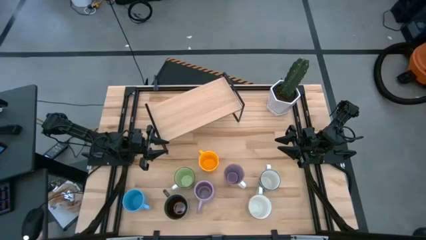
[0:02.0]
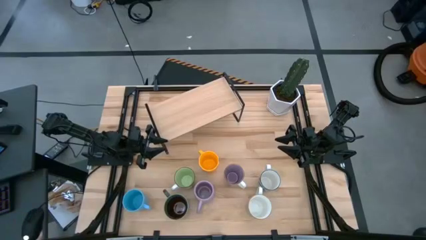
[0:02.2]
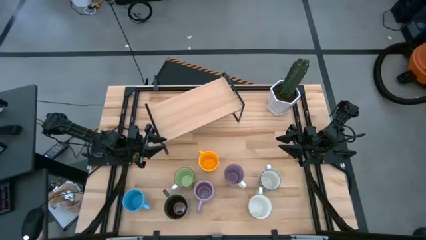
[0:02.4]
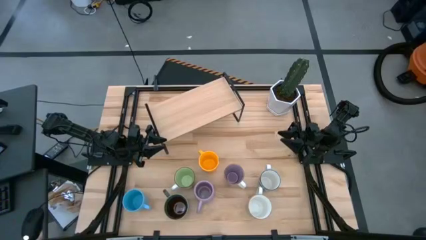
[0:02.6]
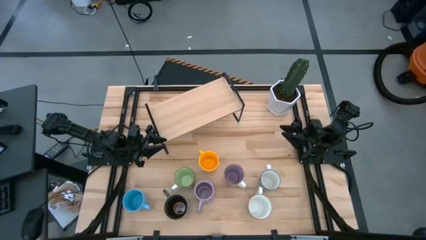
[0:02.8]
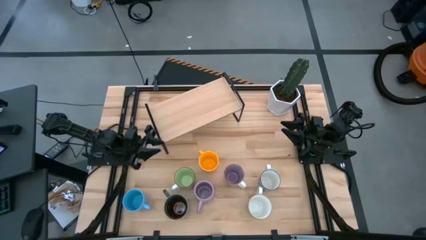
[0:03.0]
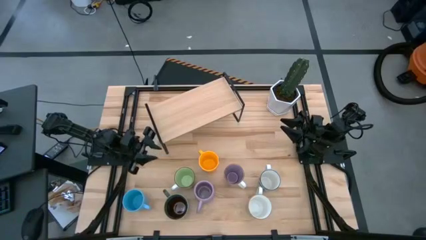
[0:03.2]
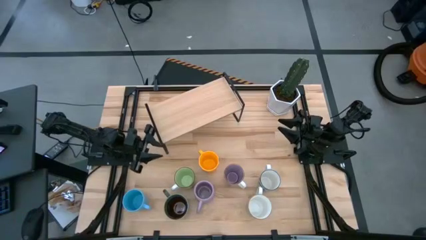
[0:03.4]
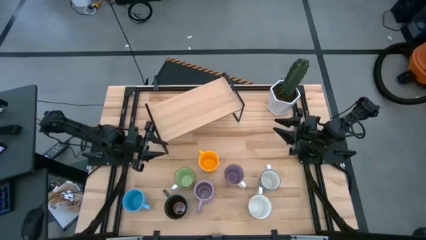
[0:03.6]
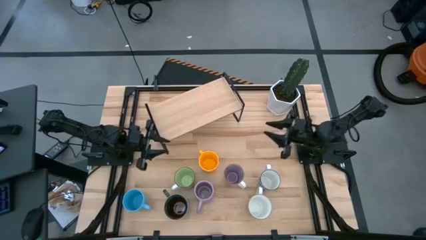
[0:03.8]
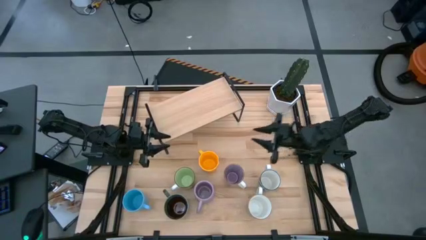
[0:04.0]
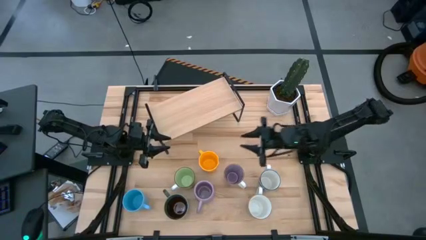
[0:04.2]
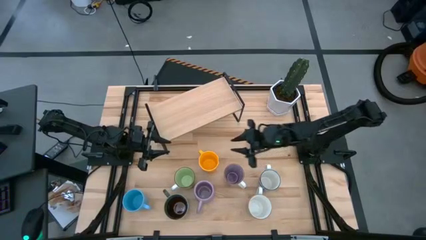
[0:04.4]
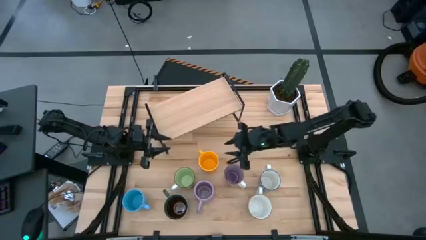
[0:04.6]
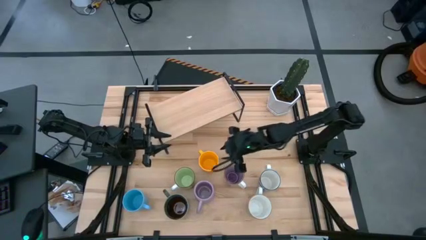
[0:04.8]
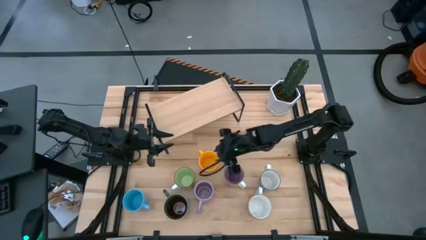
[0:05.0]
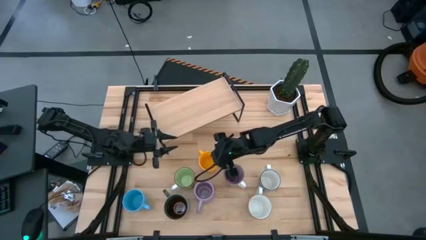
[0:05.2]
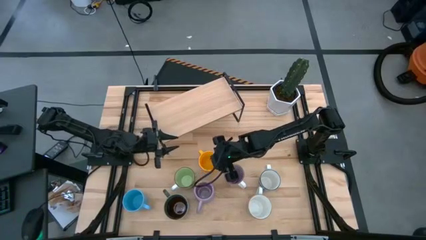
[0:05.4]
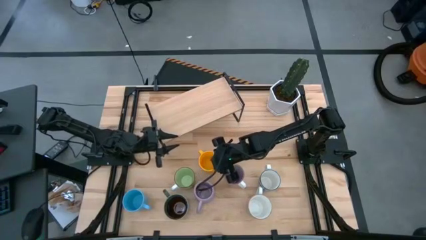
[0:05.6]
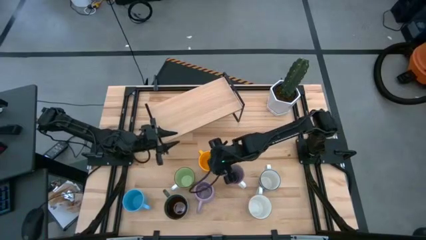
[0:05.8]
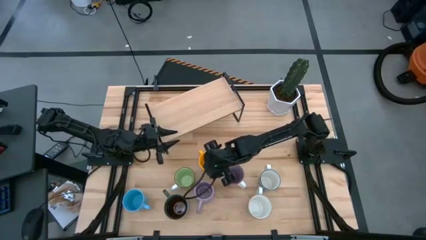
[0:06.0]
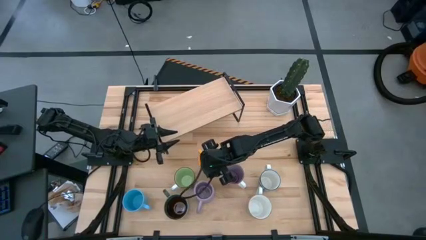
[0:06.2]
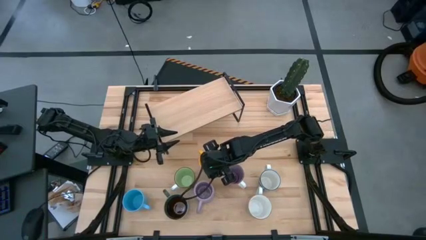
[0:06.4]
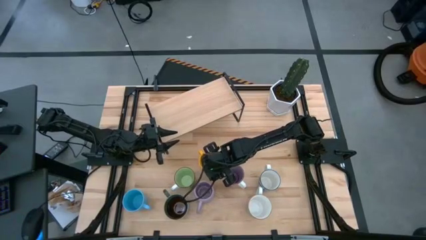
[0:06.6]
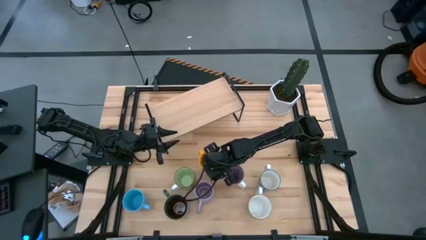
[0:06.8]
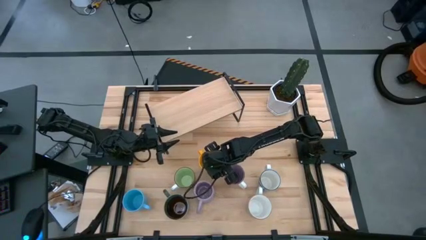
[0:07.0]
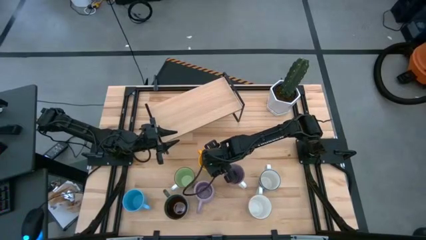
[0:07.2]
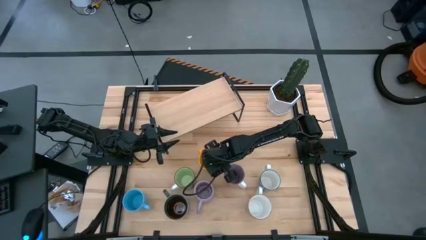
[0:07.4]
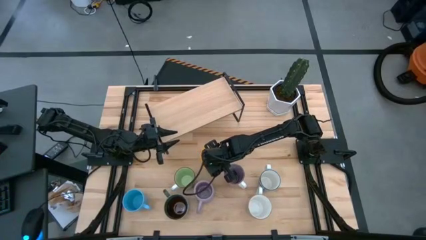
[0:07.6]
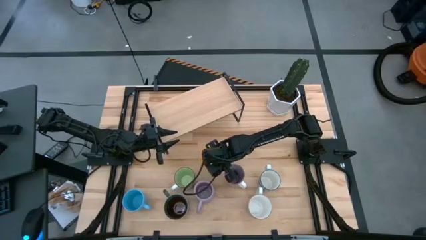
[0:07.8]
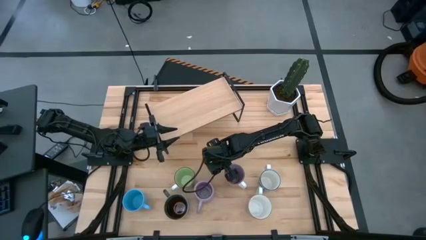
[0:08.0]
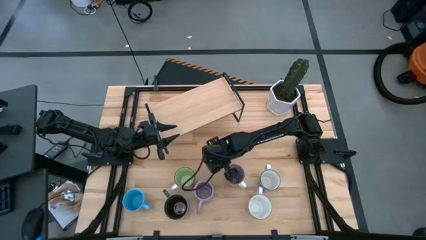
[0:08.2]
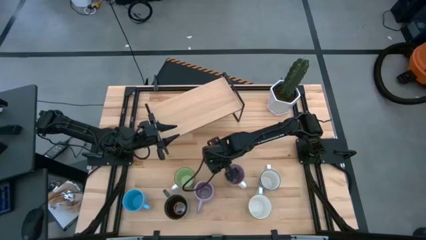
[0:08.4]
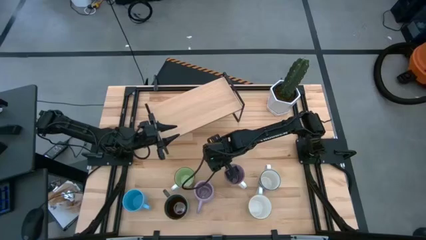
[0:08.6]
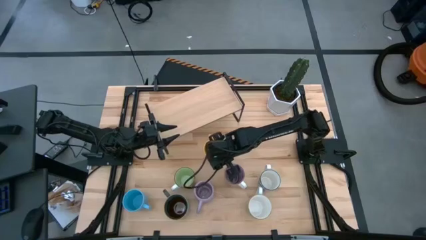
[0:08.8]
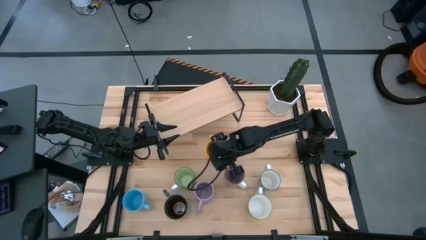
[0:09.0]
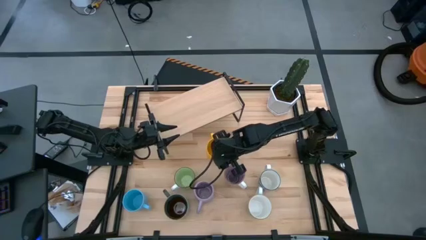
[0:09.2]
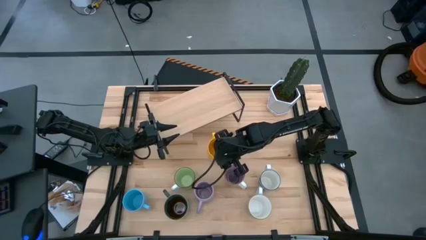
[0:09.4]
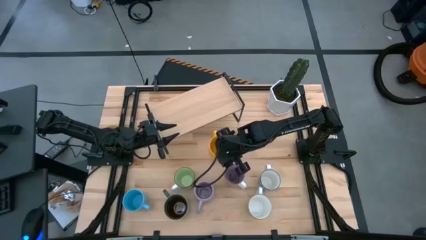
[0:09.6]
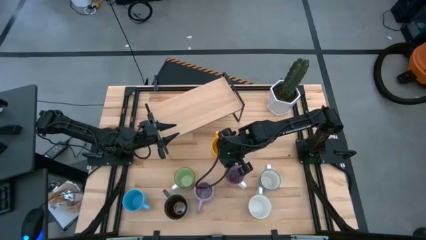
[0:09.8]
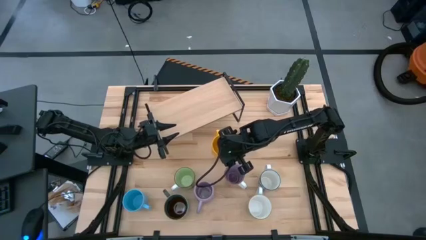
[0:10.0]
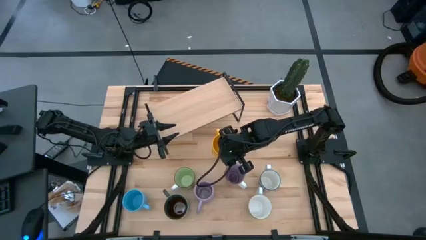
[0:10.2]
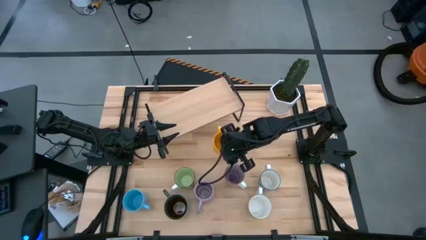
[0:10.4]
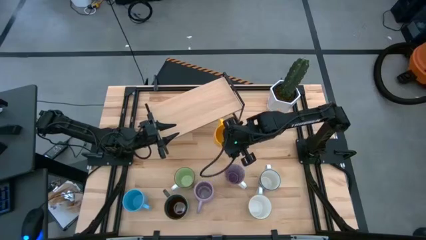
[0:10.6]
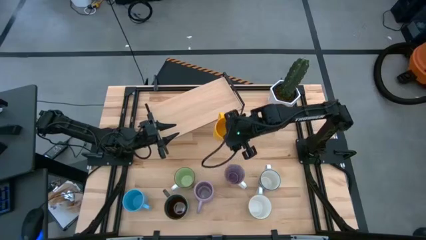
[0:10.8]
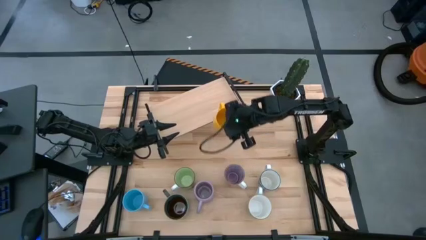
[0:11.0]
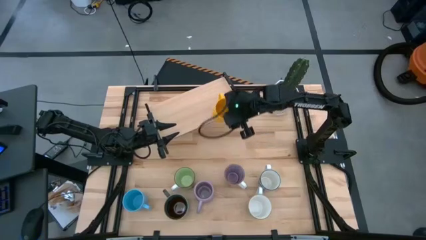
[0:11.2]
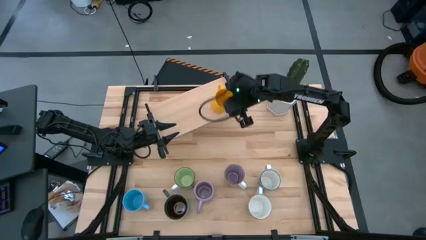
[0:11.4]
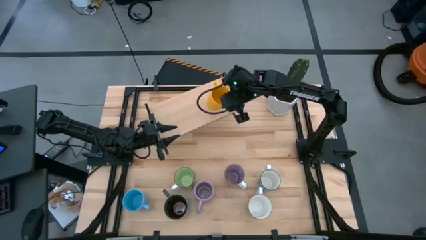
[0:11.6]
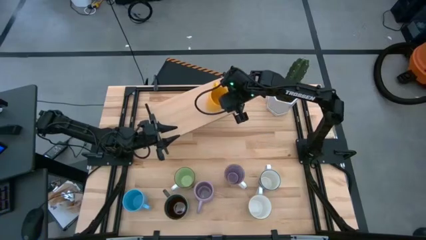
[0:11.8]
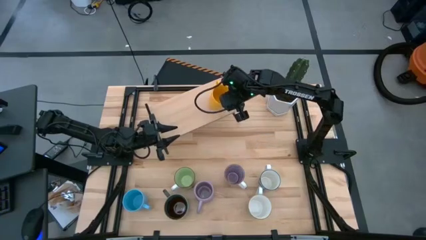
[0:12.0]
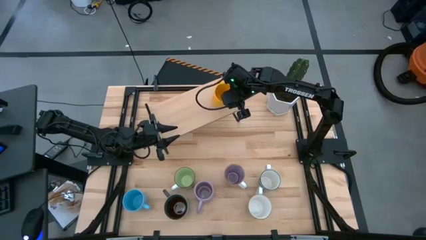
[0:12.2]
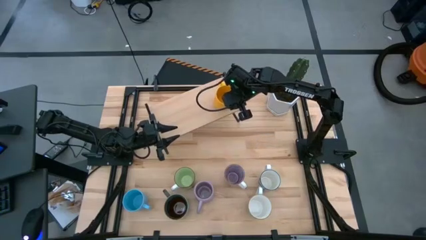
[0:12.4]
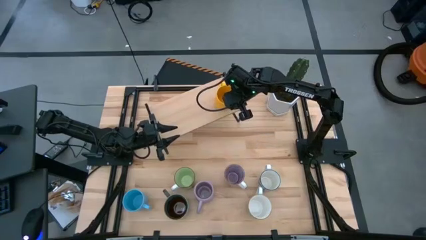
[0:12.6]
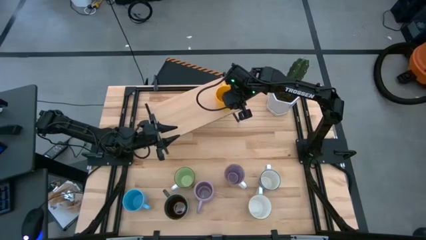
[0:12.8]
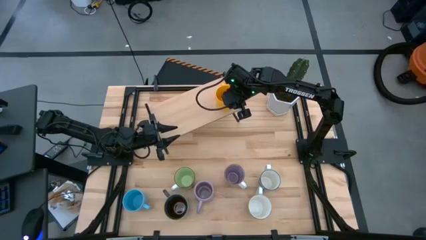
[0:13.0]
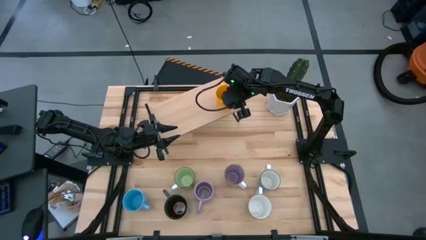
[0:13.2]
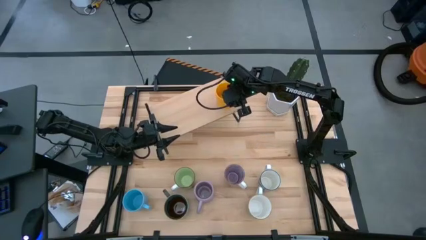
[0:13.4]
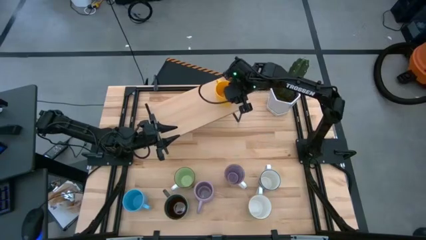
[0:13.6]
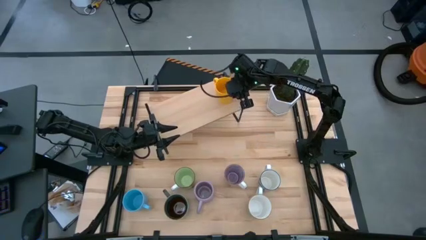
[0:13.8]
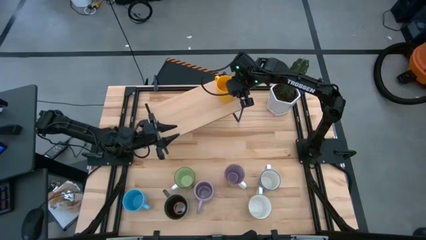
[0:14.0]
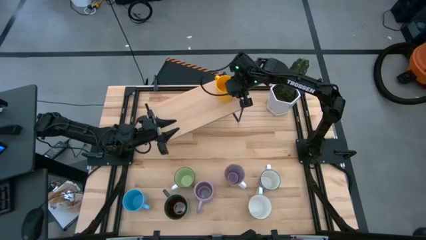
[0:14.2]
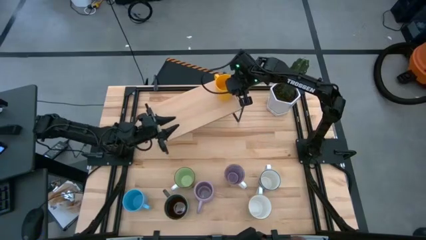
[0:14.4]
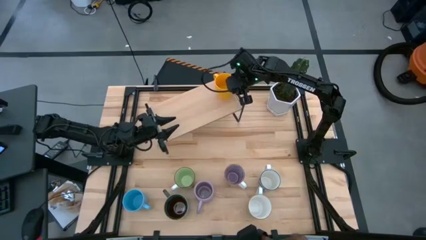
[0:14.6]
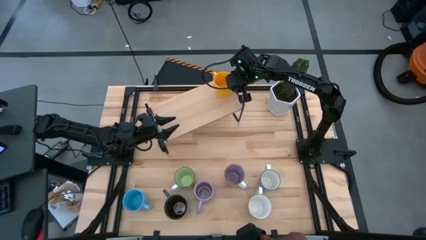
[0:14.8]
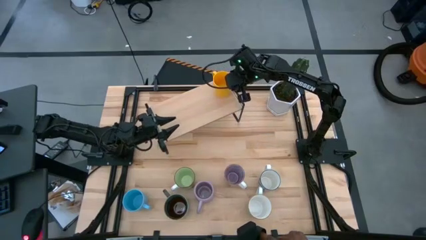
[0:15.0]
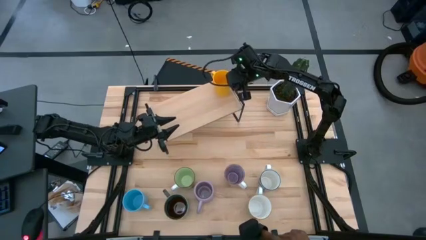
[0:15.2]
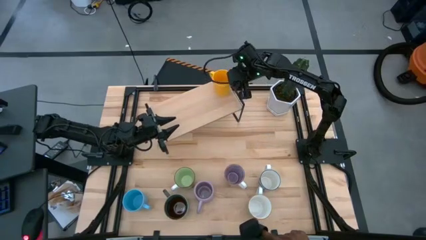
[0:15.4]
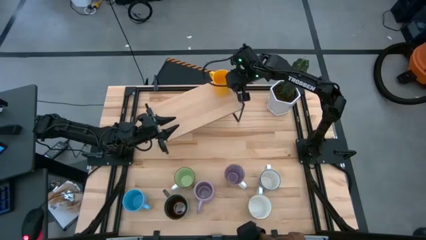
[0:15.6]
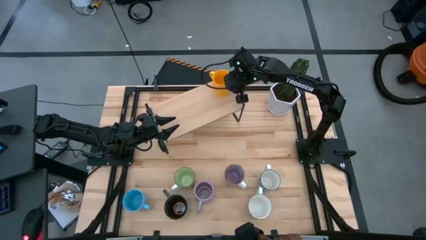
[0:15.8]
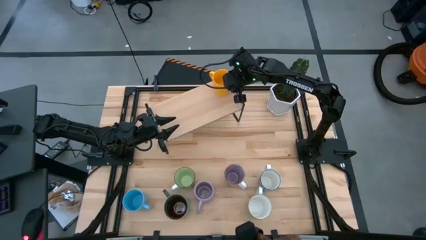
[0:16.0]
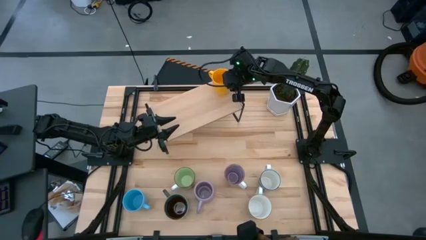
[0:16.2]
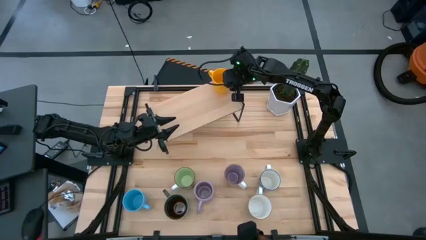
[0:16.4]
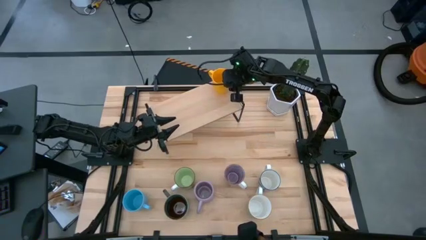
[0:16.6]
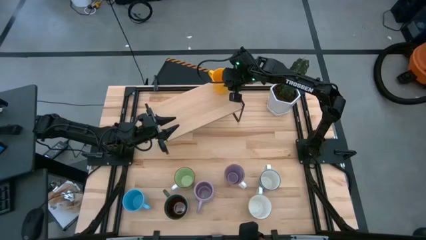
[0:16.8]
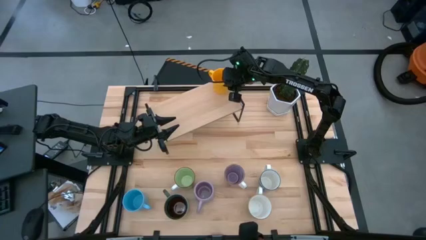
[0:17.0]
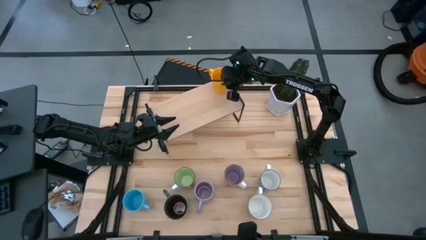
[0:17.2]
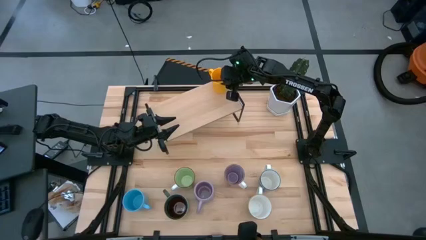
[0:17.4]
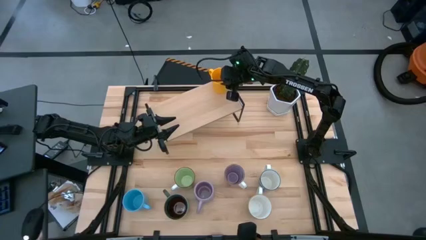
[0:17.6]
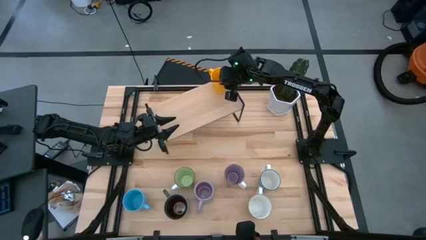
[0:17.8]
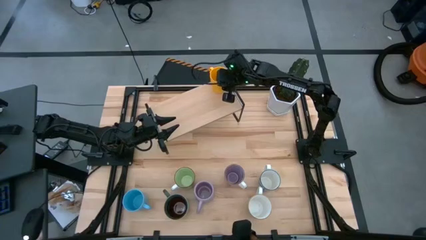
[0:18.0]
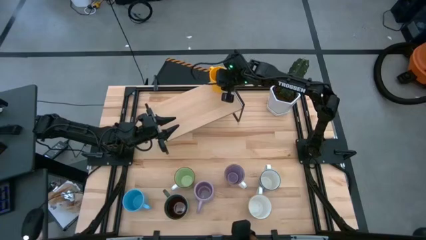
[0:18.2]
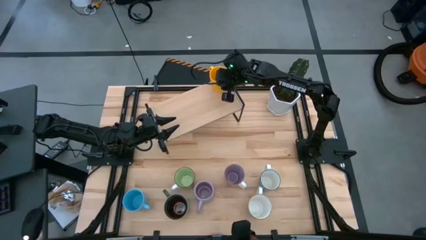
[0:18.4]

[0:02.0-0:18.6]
Task: Place coffee mugs
Put the yellow mug on the shelf
